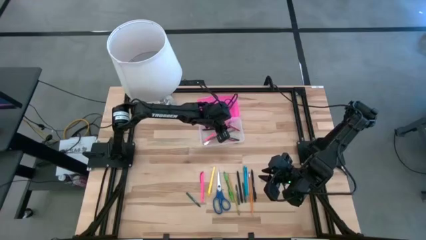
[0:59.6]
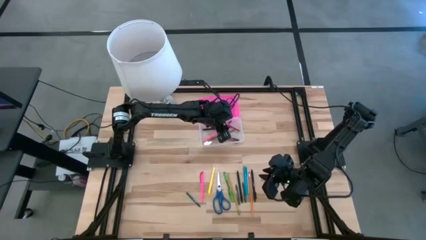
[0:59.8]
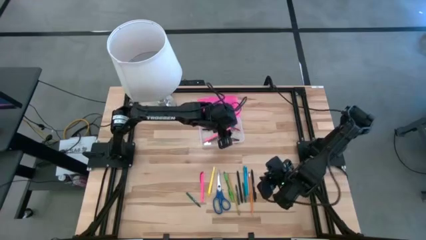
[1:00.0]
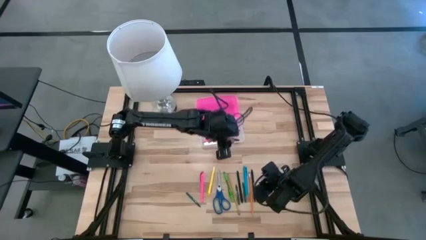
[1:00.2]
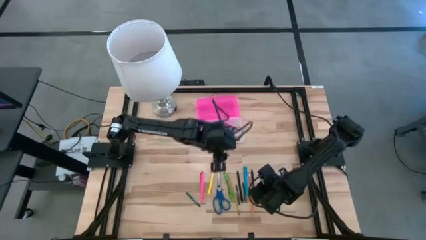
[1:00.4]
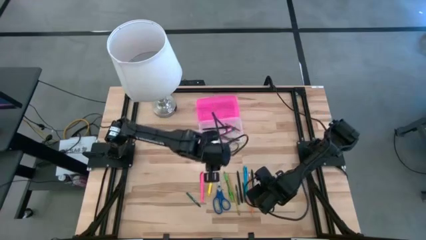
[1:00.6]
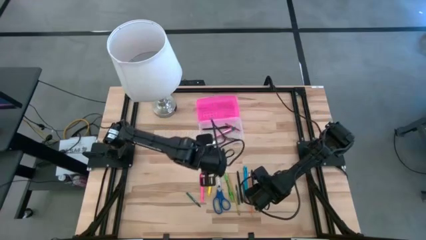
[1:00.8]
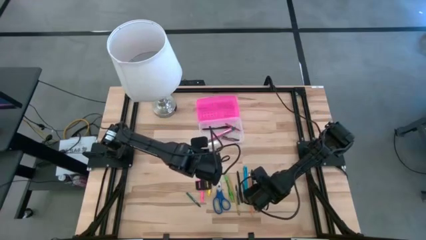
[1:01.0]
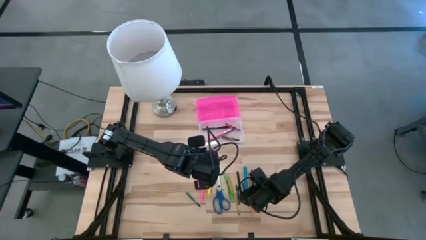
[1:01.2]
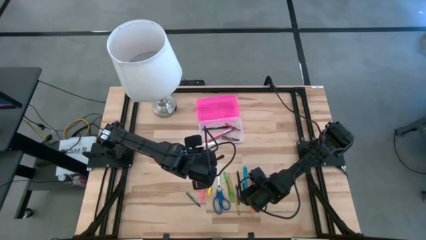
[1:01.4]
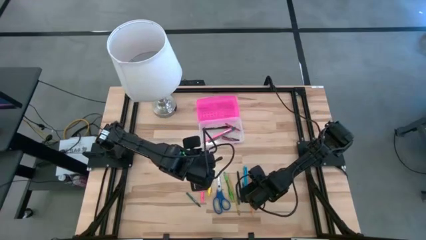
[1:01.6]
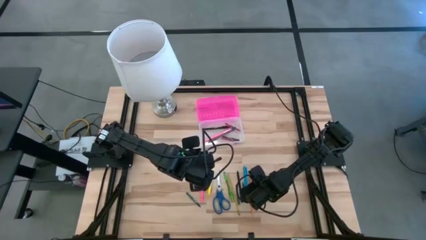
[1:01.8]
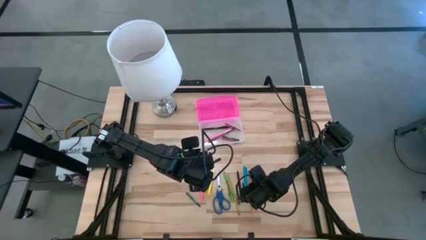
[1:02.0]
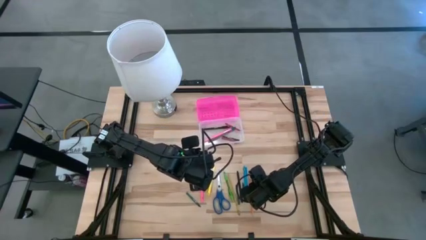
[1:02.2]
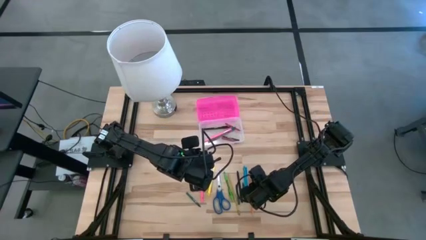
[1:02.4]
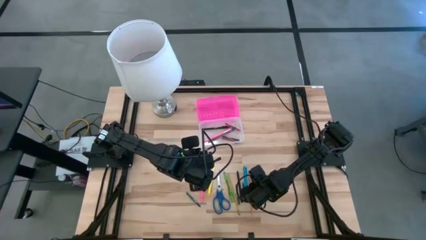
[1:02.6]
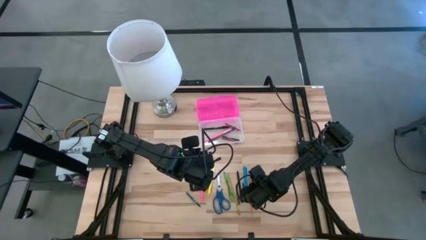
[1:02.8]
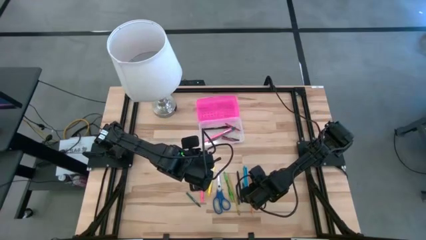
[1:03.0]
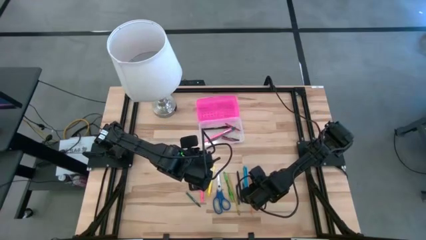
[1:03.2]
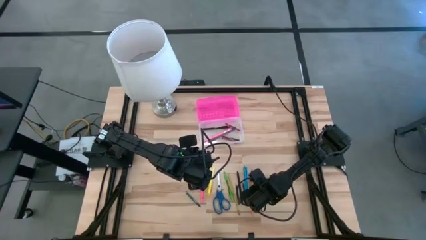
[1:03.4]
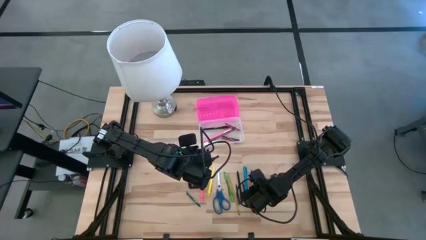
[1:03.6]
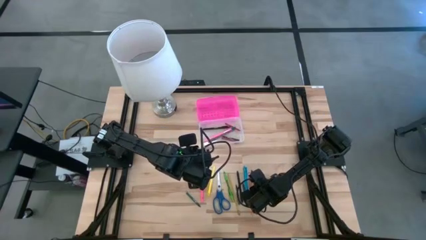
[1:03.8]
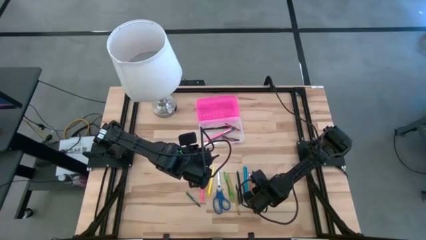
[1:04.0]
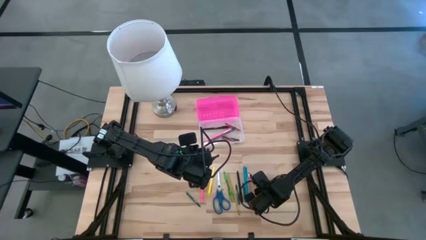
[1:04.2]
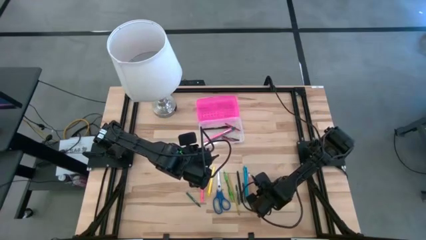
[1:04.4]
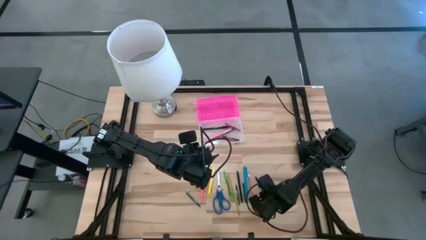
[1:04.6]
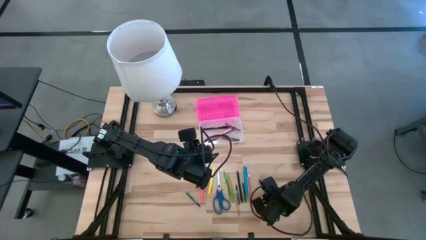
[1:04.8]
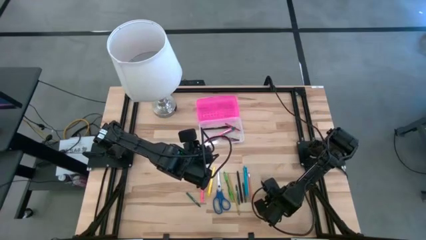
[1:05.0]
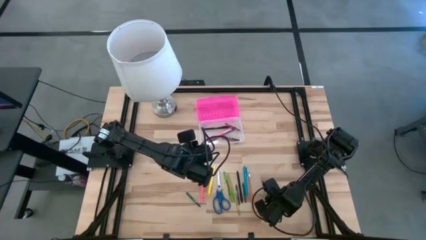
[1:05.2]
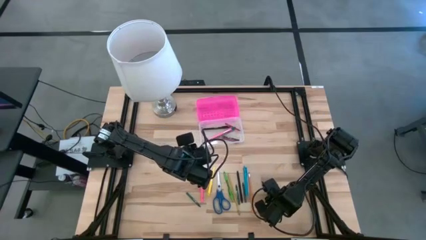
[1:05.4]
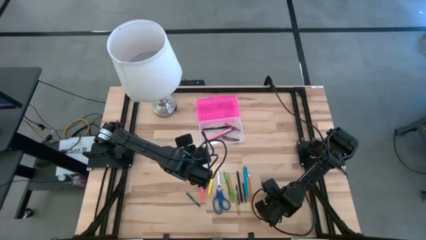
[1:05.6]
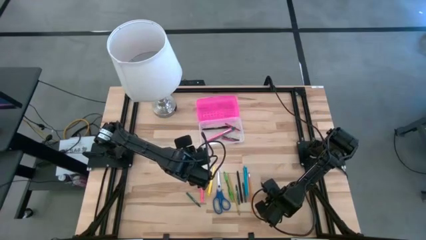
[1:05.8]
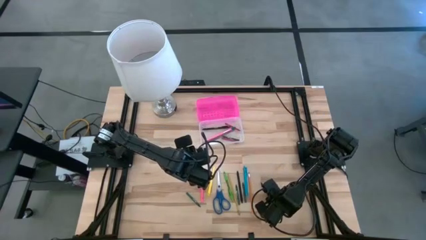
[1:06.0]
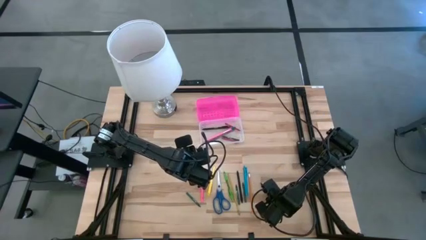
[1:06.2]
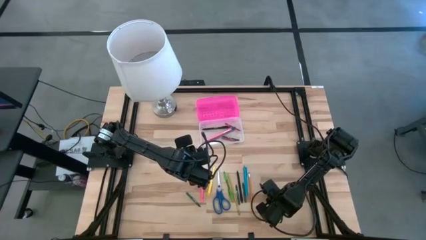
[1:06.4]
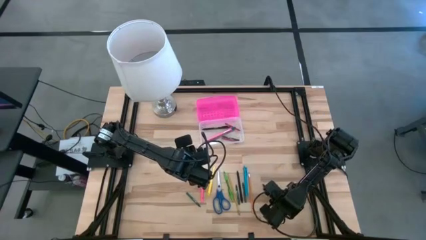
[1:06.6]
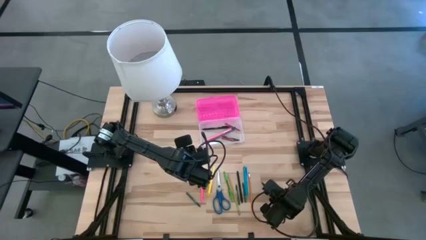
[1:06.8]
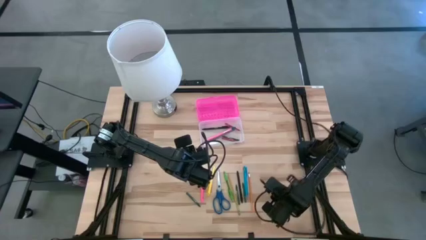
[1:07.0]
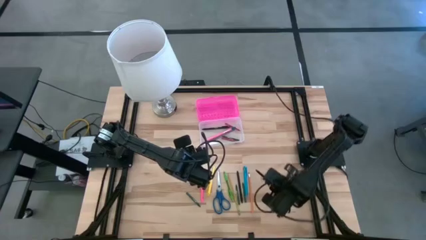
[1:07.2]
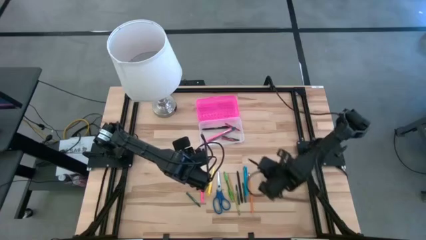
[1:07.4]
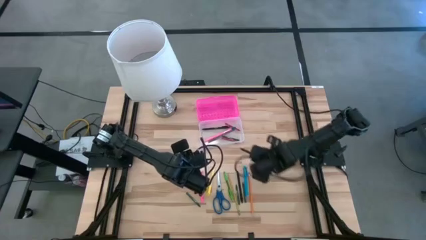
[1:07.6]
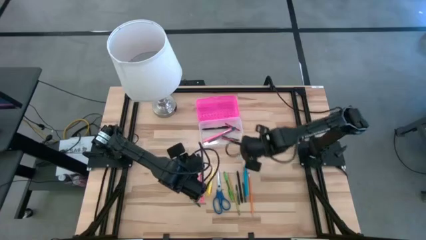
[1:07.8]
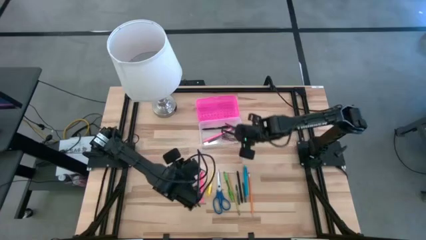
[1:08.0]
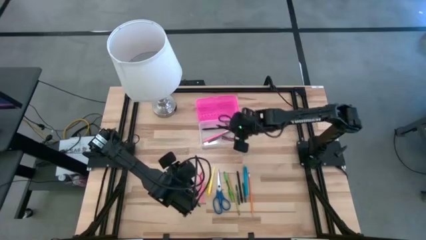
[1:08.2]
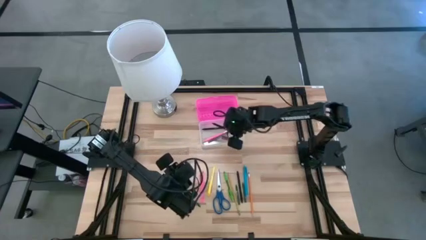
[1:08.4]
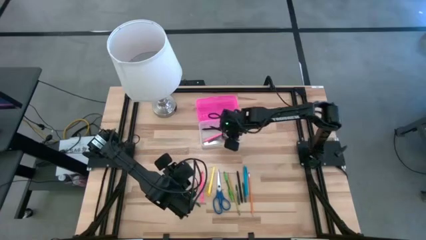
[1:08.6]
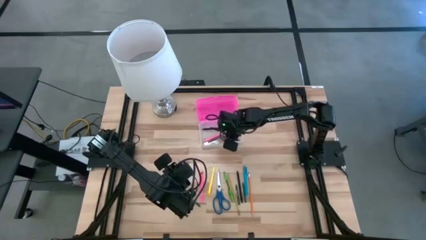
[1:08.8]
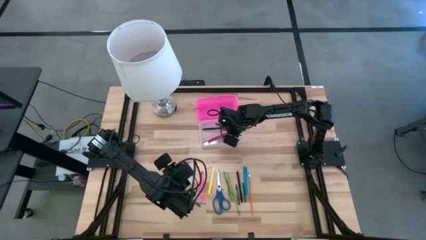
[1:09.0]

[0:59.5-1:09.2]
Task: Pick & place school supplies into a supply box
Put the right black pen into the pink supply box

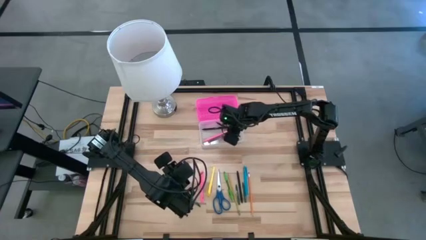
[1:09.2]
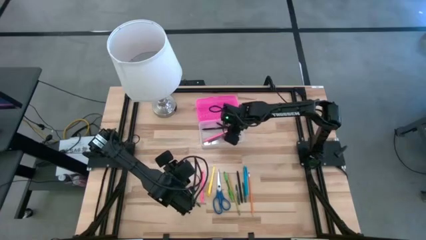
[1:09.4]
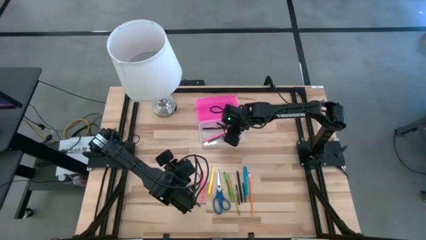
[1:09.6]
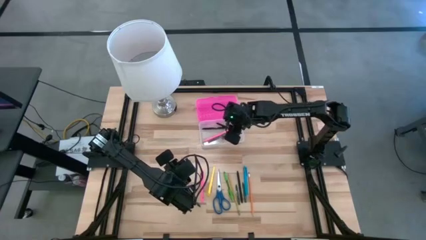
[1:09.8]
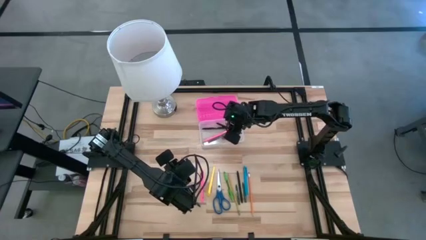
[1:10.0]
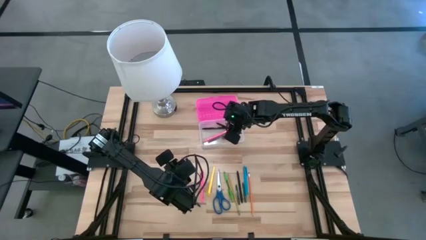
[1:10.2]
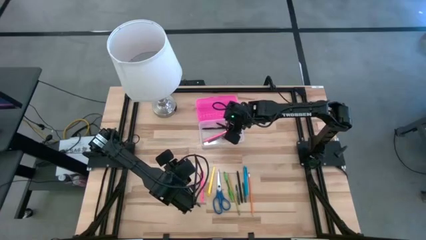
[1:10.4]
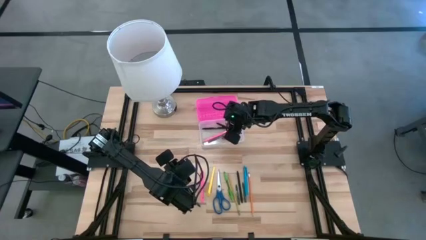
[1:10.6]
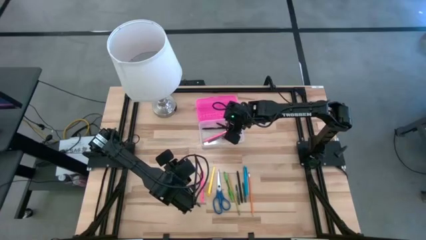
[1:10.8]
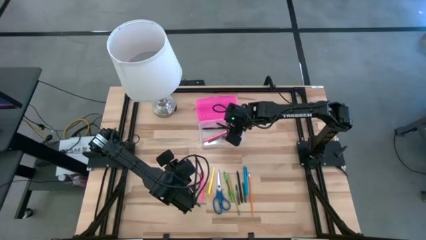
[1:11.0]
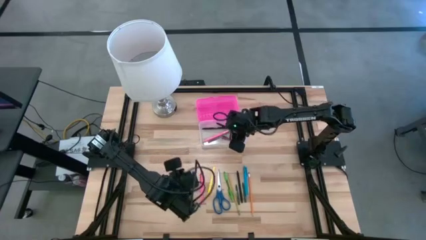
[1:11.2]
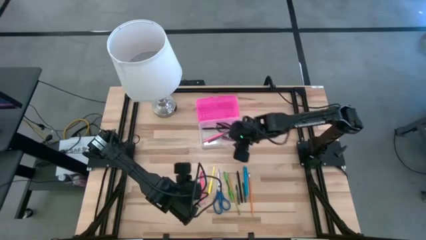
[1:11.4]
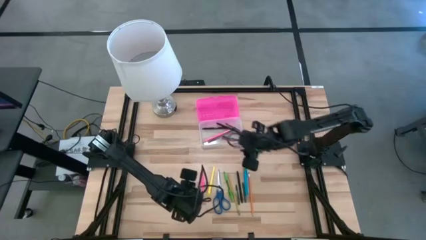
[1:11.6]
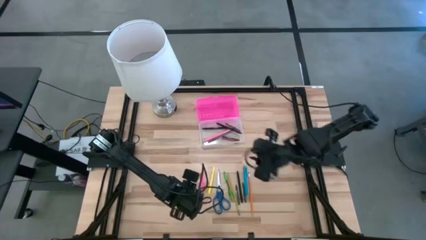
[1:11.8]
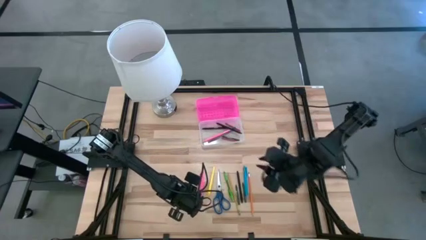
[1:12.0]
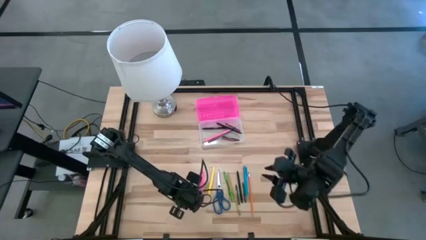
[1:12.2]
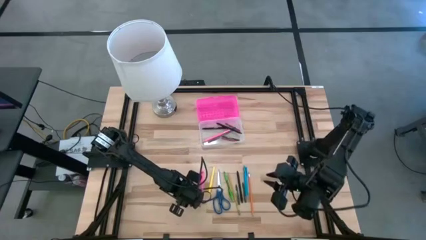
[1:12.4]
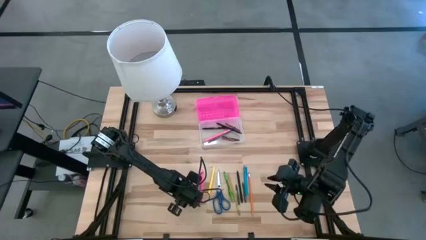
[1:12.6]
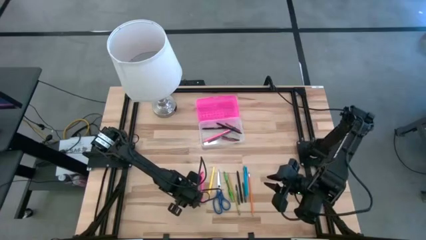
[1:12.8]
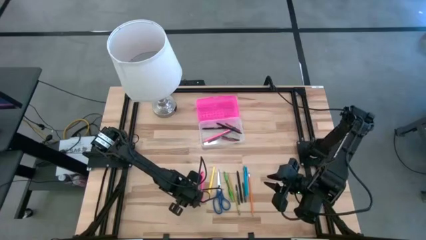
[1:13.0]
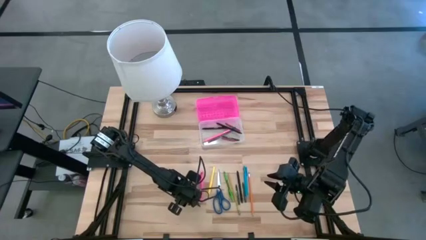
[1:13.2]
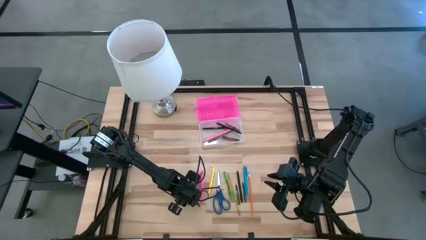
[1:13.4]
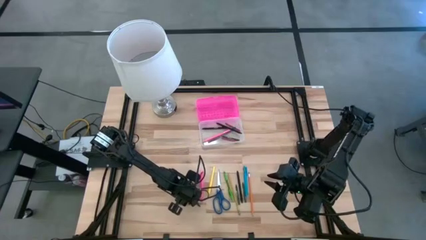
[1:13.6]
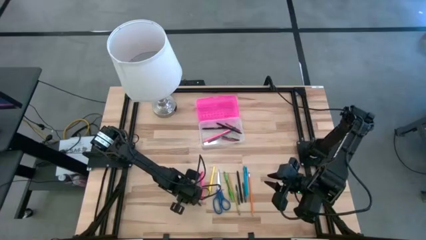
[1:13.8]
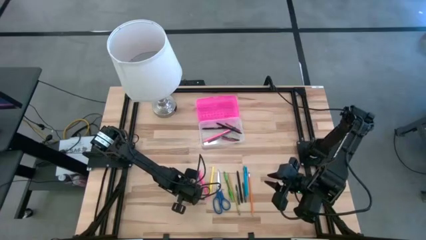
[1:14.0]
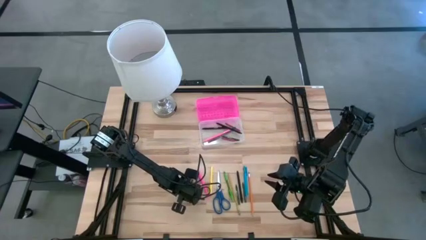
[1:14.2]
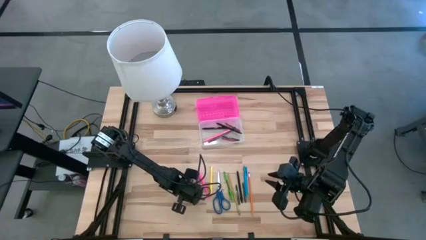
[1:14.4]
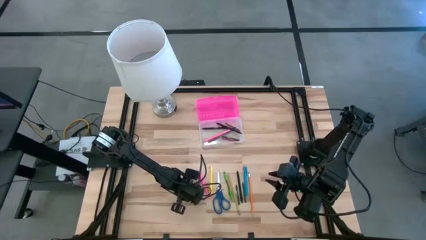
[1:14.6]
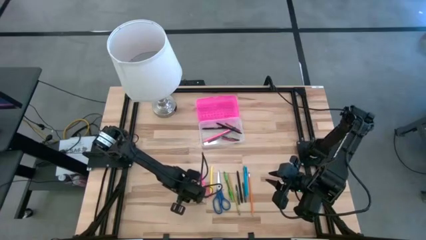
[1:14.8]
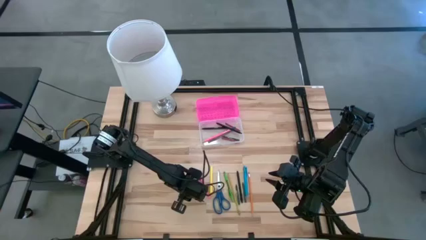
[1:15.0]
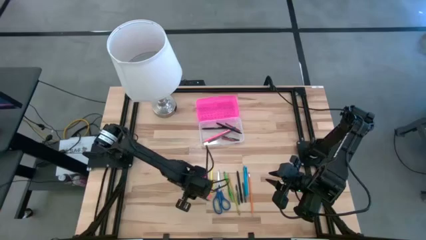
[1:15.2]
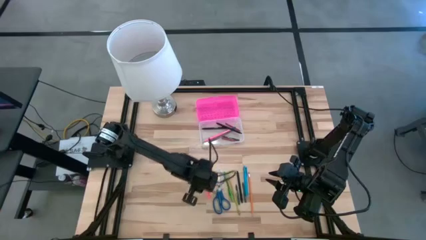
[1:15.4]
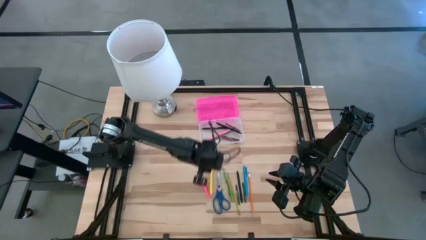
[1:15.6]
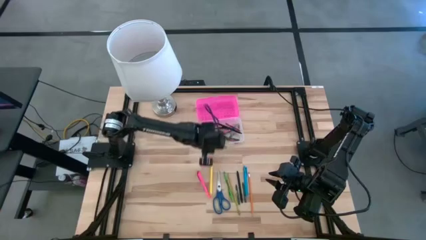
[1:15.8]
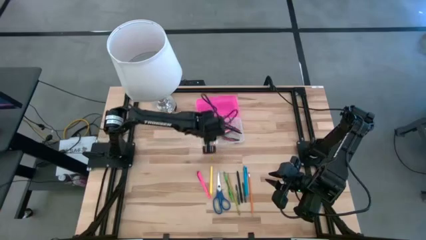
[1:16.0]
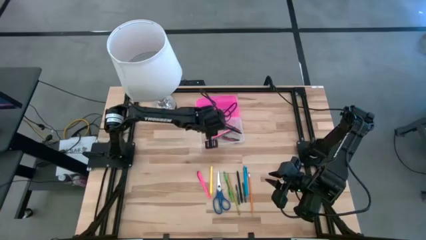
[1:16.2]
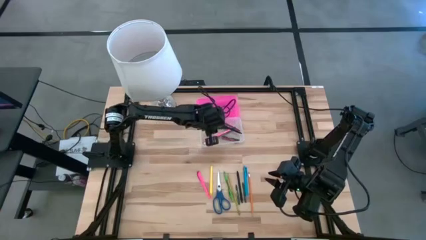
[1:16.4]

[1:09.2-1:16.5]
Put the left green crayon into the pink supply box
